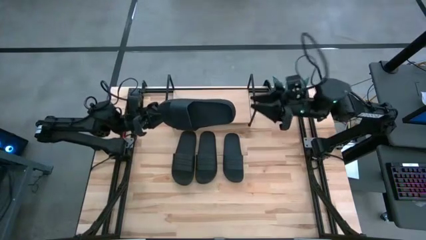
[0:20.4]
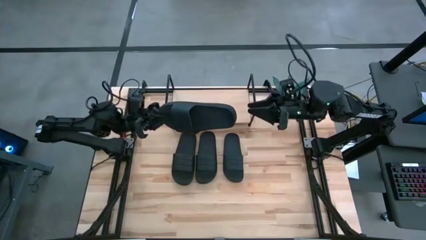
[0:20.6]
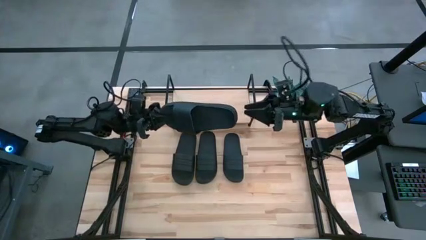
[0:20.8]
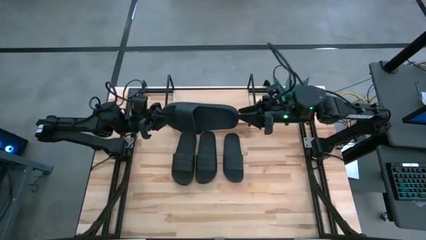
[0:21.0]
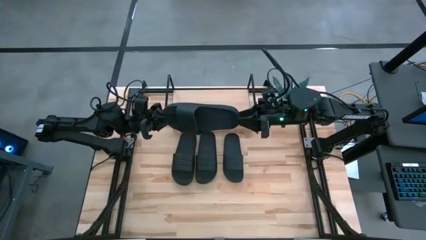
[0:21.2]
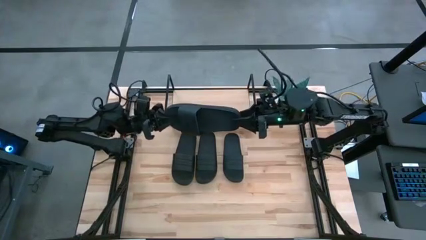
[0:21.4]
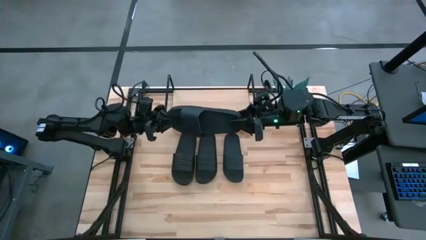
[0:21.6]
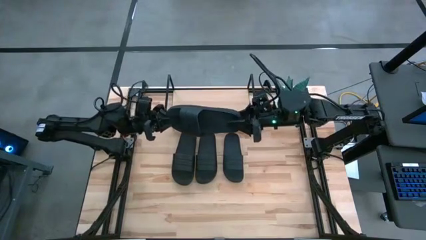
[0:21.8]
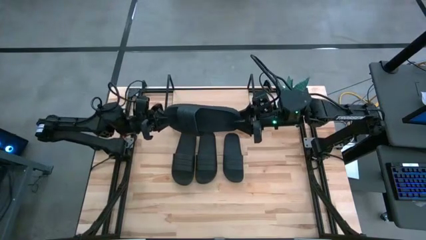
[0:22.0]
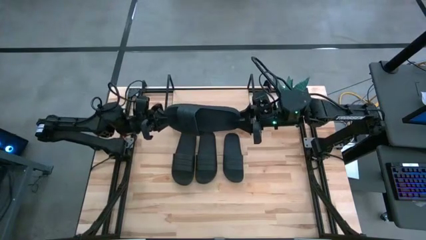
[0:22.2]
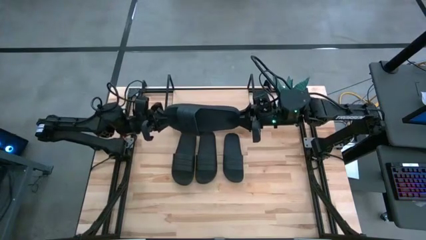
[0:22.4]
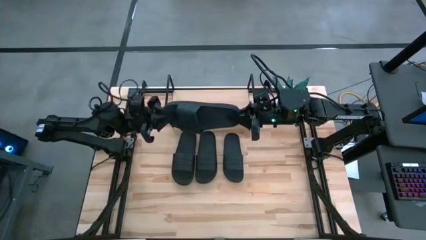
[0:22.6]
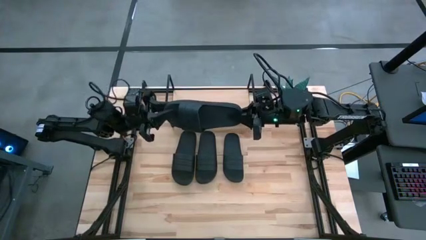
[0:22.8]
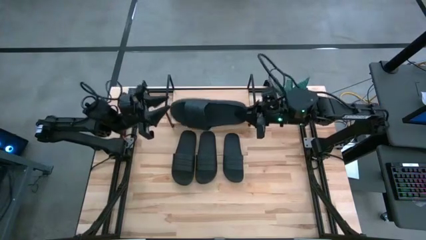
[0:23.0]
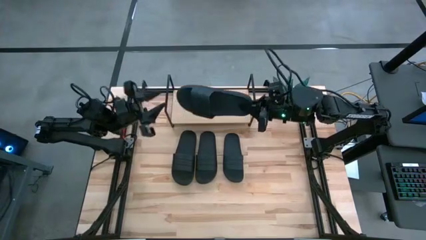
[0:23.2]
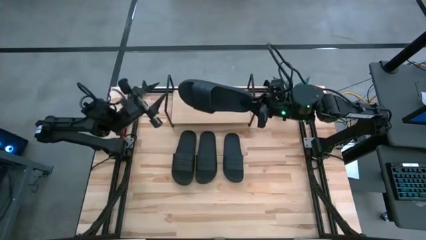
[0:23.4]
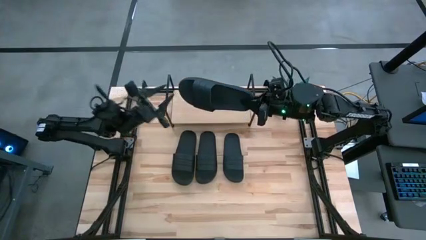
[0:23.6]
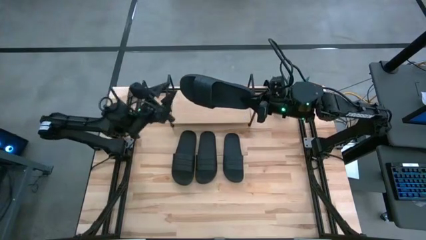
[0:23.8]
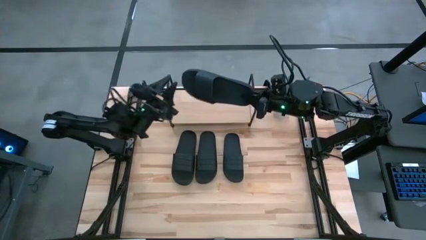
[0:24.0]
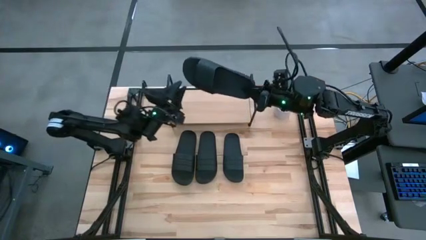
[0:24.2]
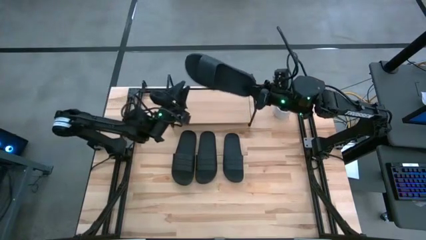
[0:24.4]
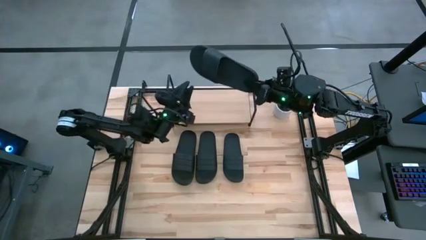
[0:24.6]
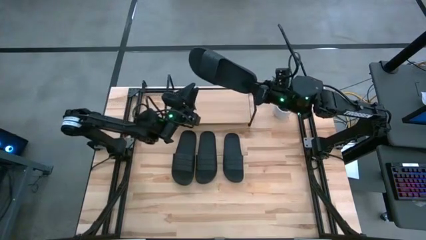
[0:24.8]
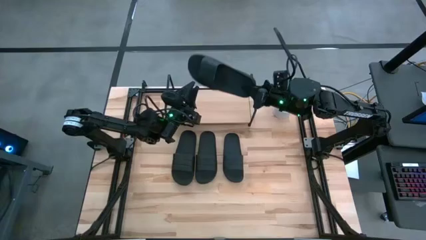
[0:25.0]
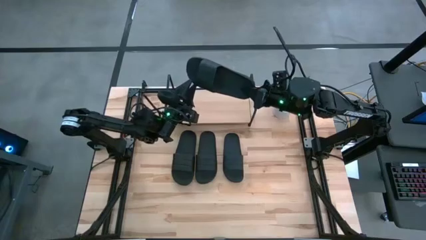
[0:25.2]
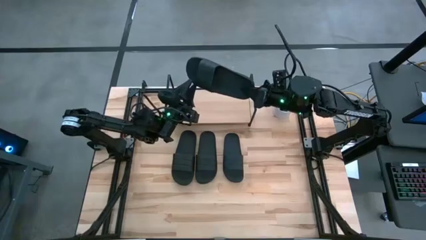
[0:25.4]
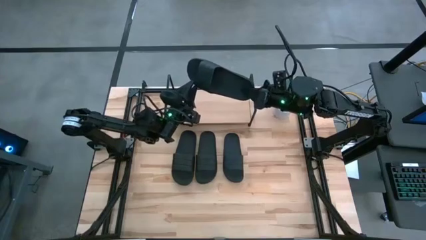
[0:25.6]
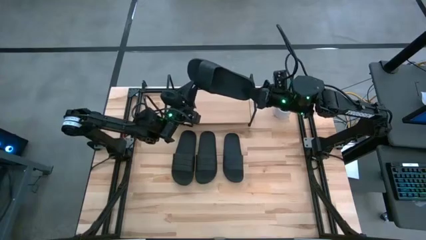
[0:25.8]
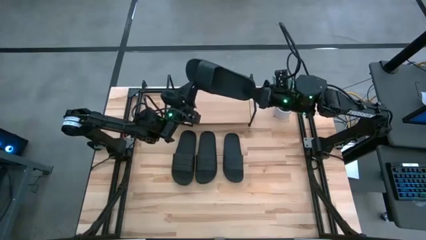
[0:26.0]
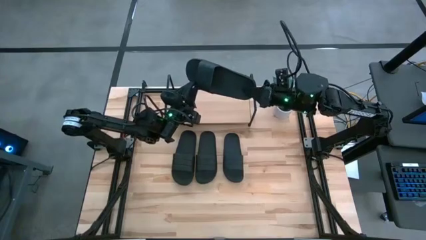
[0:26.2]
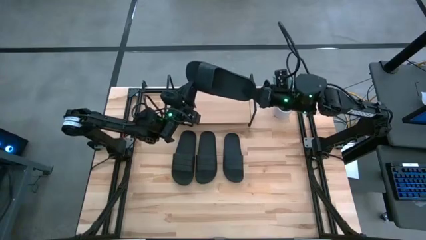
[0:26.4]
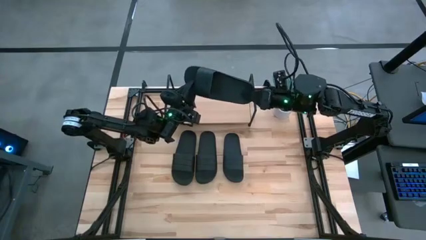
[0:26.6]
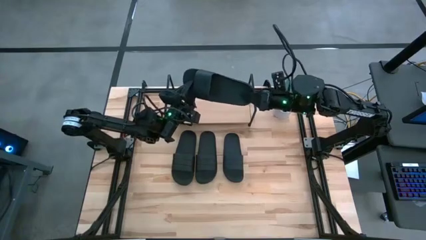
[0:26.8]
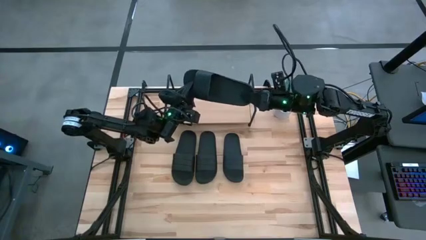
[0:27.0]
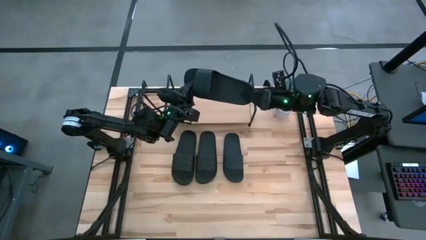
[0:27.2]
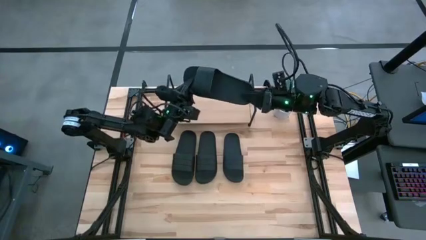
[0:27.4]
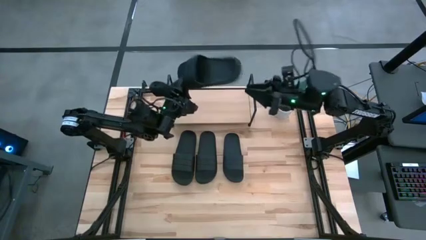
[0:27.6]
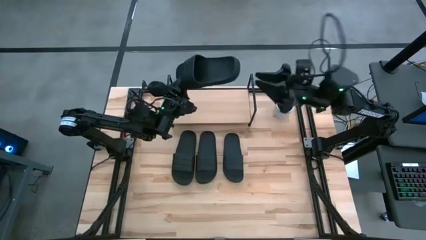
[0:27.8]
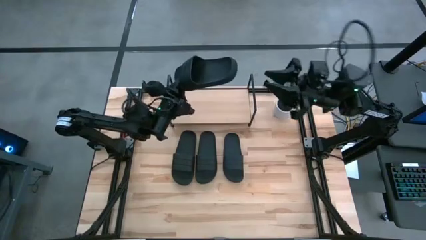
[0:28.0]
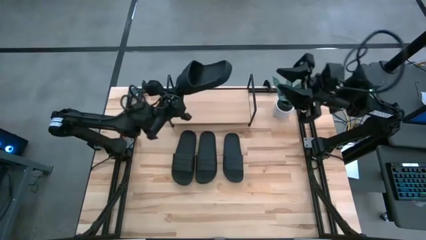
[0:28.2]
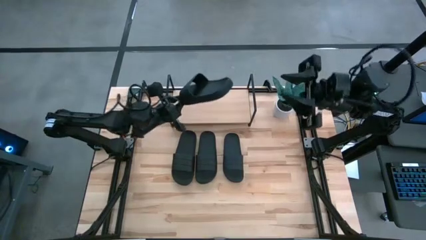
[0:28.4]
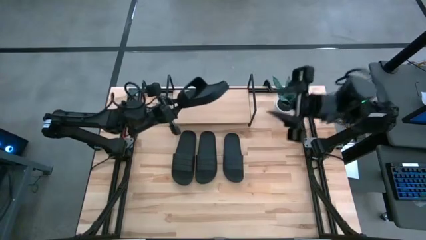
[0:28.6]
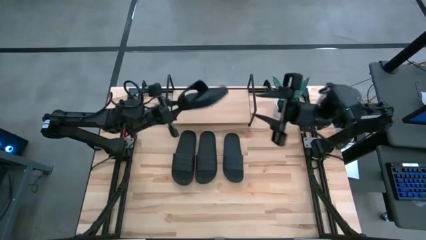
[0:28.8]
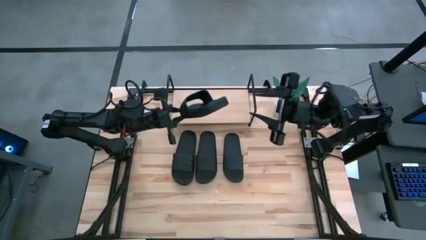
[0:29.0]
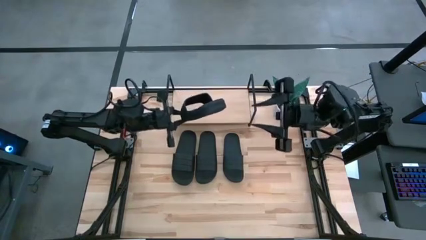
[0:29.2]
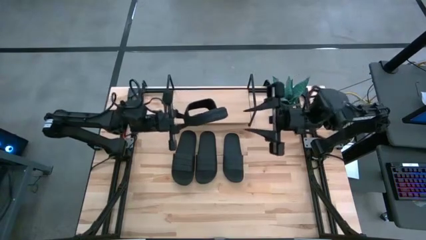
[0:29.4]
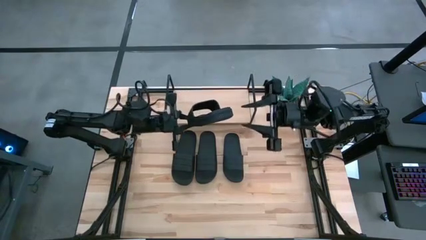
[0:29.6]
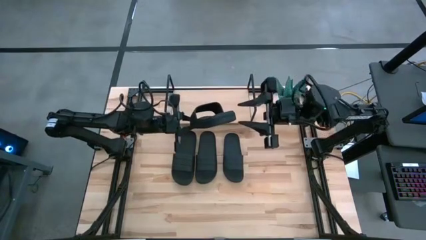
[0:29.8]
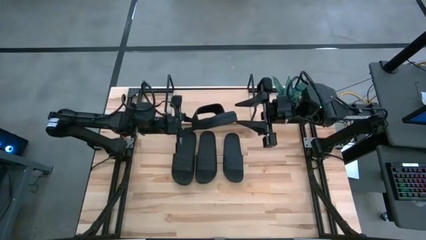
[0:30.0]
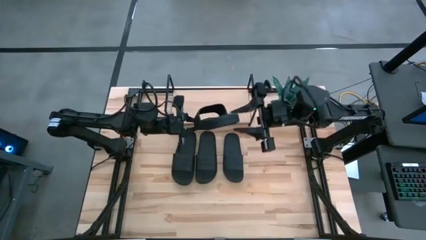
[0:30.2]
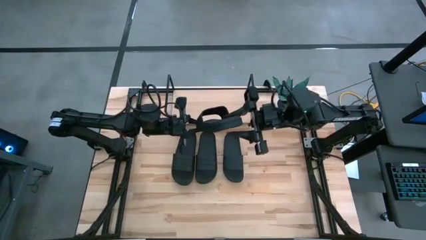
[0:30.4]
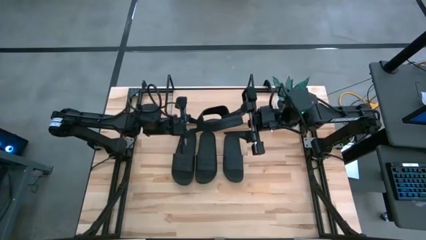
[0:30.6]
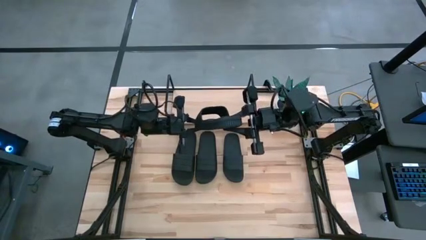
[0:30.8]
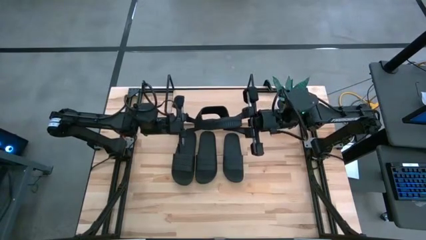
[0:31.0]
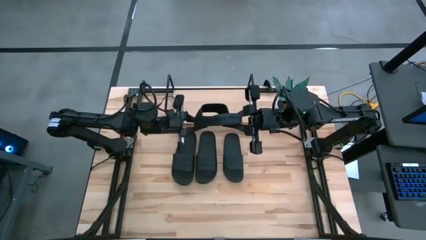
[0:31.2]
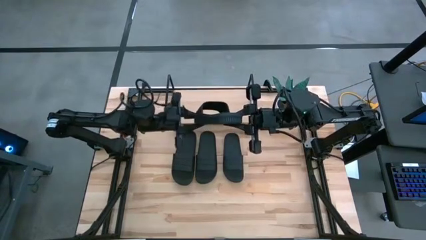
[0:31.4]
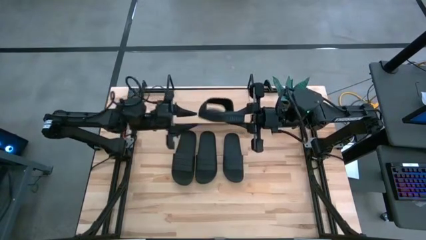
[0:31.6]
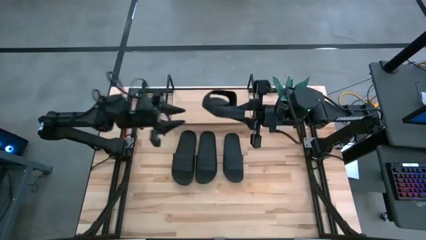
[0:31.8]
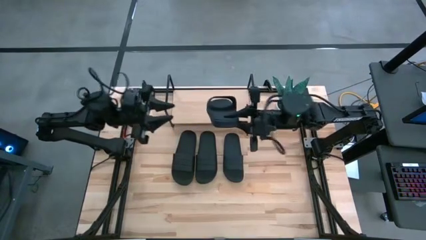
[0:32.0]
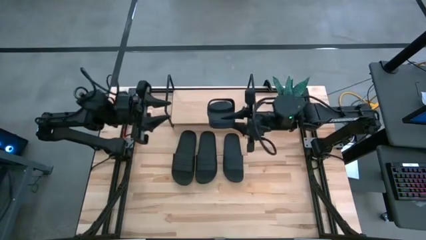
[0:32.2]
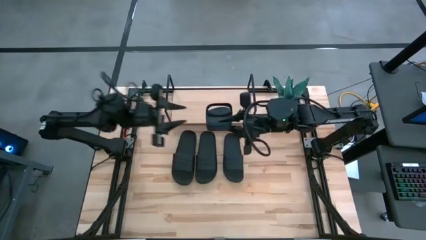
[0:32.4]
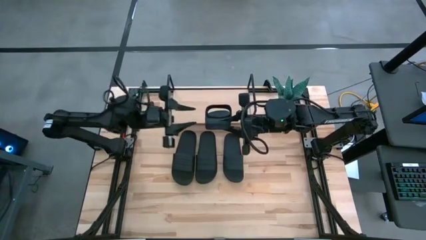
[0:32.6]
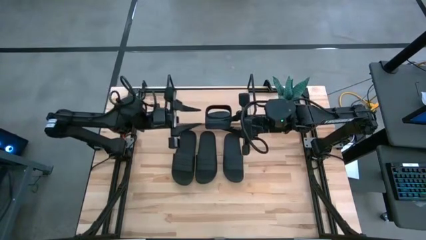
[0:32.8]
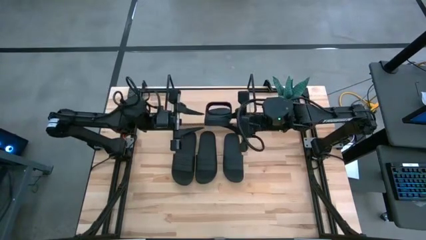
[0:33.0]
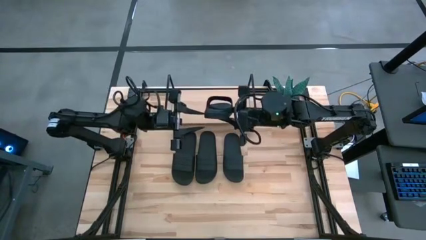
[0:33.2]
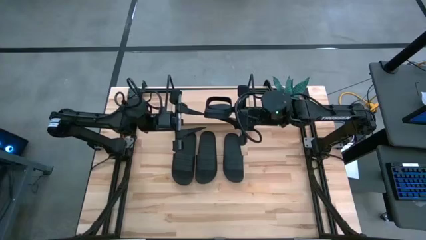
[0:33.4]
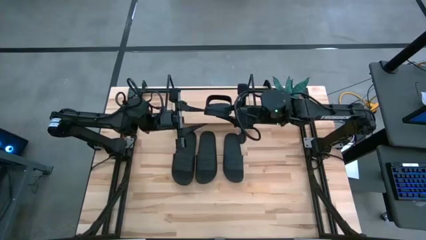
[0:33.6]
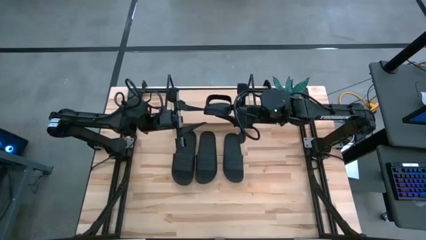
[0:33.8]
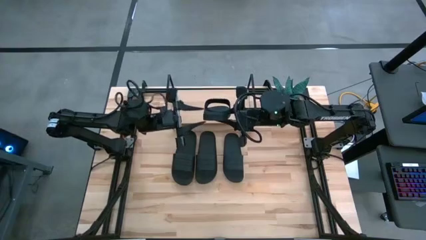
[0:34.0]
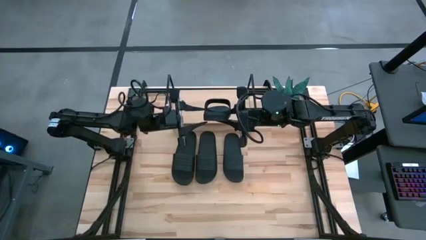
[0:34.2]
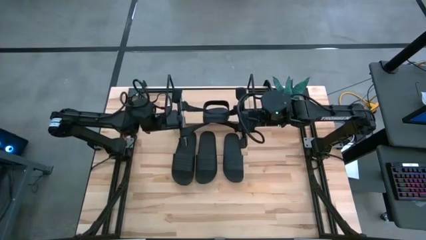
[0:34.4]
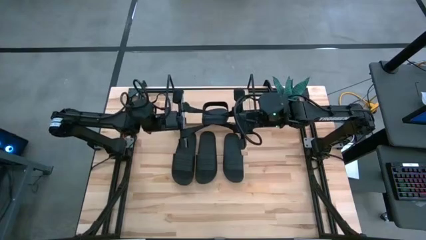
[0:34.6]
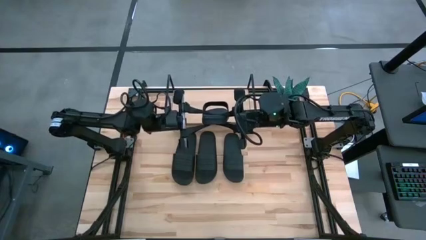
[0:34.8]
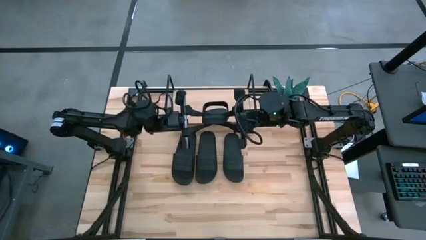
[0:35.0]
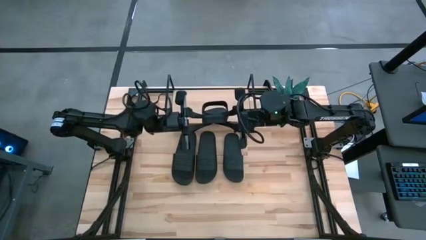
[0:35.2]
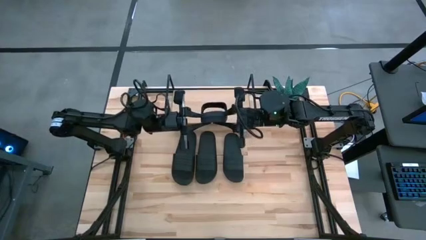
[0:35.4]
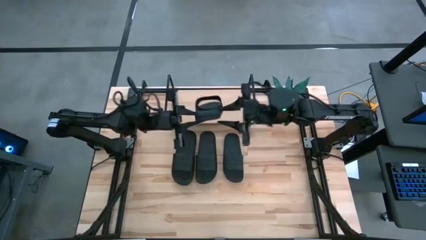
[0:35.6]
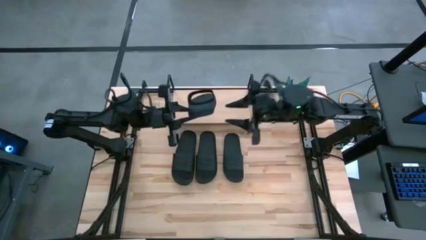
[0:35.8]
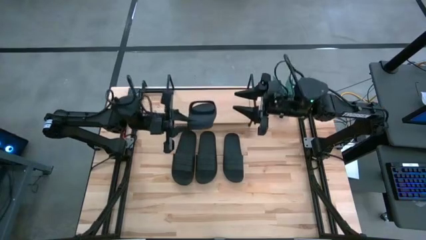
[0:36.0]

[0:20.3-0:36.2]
Task: Pick and place slides into the shelf
Put the black slide on the shelf
